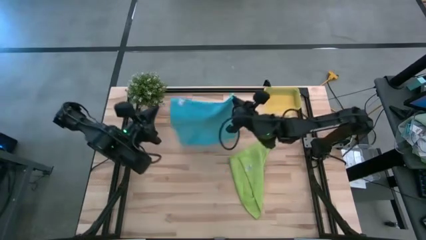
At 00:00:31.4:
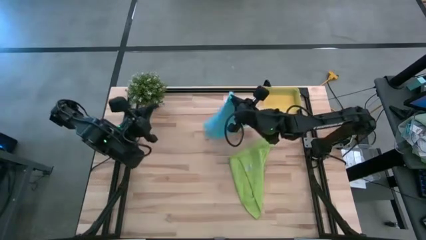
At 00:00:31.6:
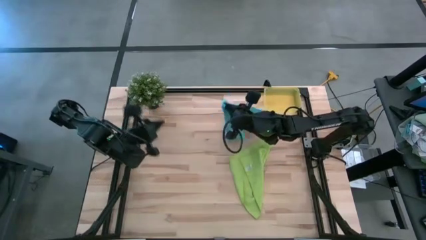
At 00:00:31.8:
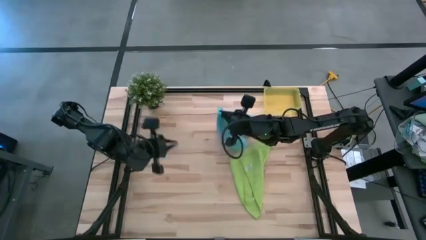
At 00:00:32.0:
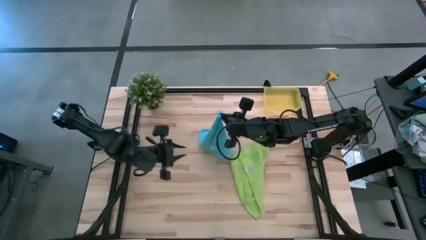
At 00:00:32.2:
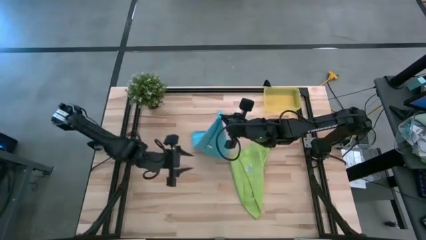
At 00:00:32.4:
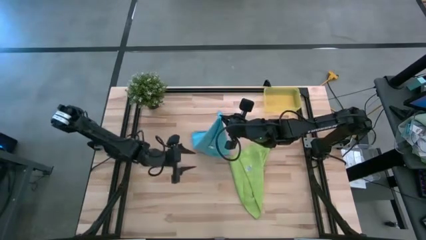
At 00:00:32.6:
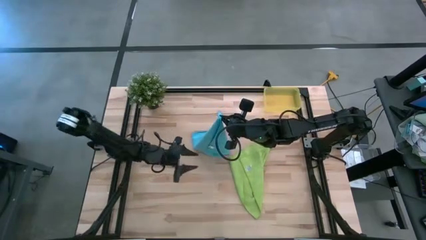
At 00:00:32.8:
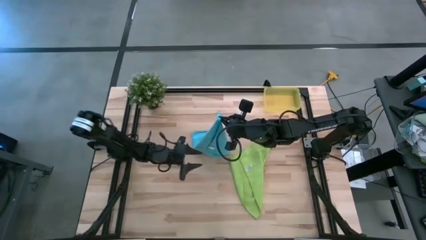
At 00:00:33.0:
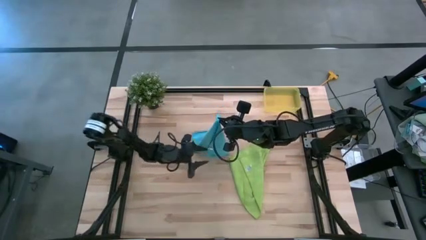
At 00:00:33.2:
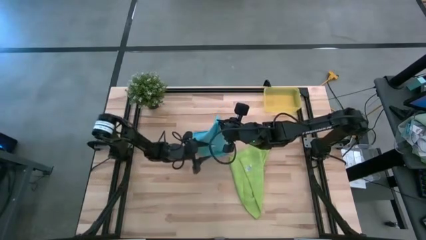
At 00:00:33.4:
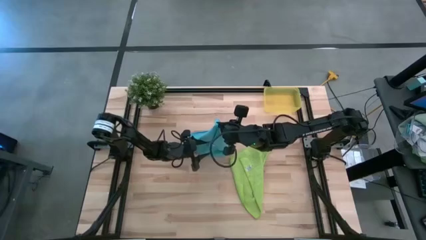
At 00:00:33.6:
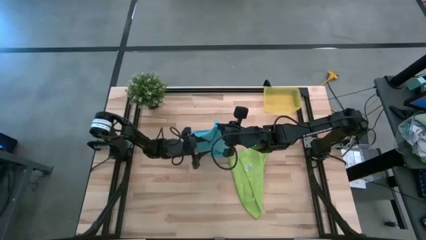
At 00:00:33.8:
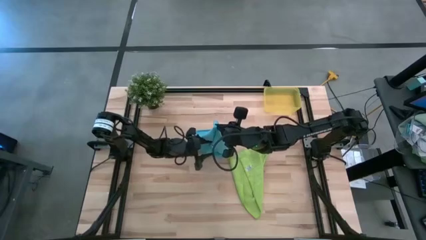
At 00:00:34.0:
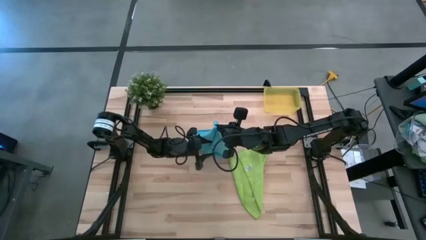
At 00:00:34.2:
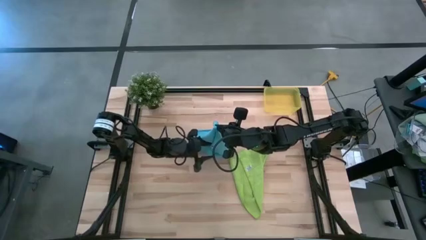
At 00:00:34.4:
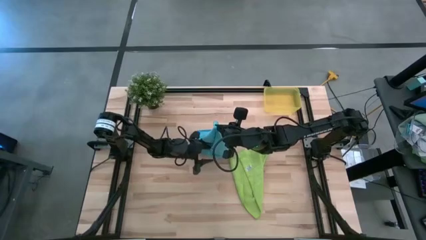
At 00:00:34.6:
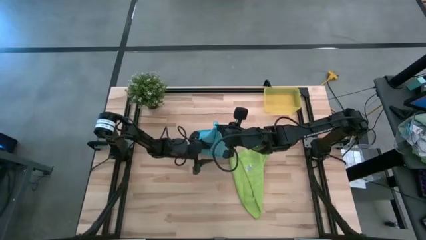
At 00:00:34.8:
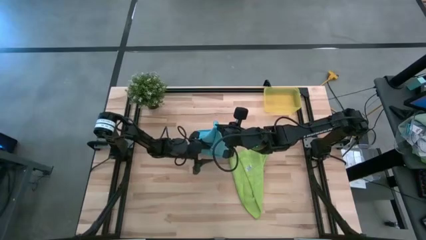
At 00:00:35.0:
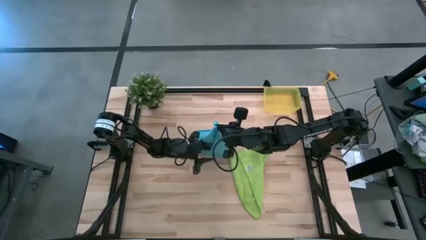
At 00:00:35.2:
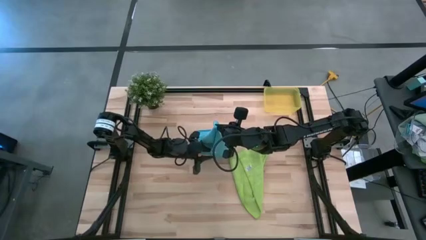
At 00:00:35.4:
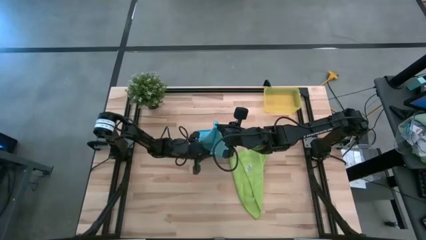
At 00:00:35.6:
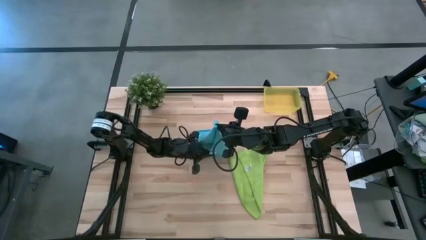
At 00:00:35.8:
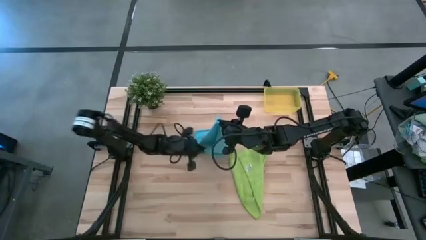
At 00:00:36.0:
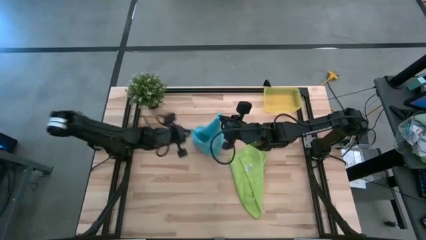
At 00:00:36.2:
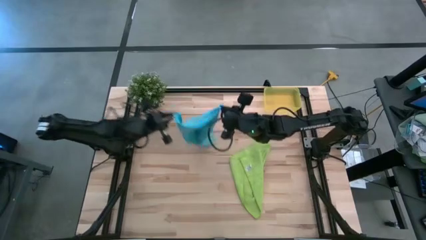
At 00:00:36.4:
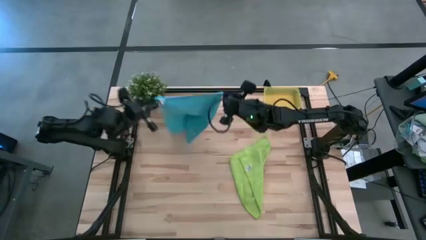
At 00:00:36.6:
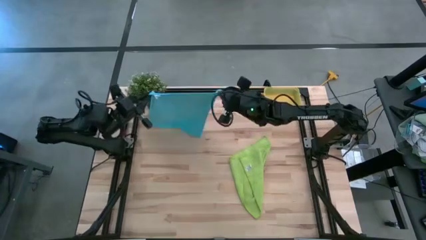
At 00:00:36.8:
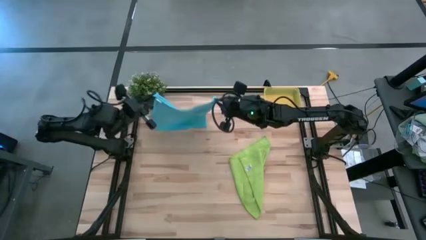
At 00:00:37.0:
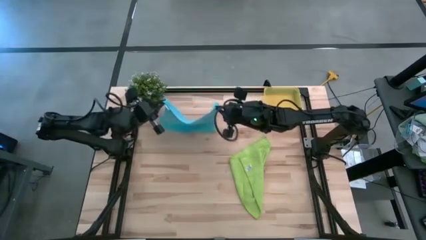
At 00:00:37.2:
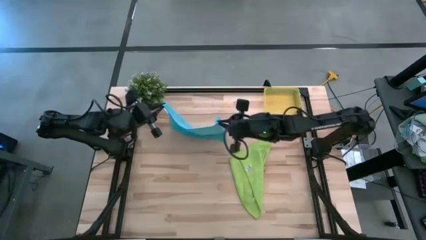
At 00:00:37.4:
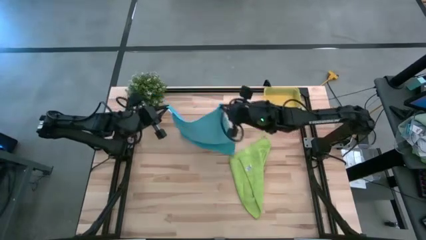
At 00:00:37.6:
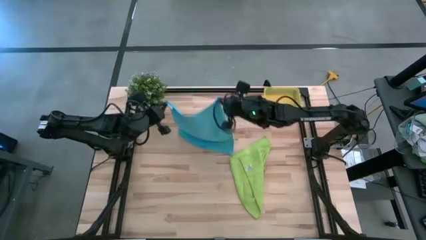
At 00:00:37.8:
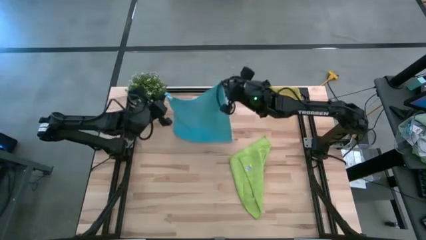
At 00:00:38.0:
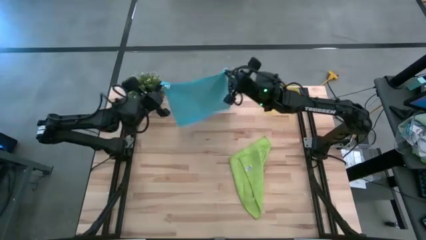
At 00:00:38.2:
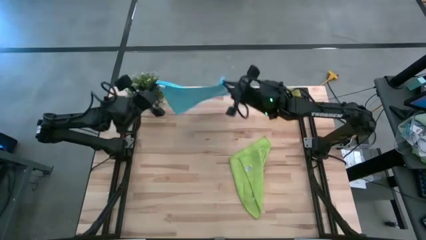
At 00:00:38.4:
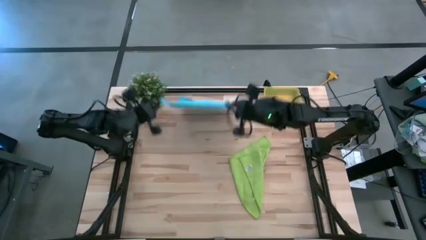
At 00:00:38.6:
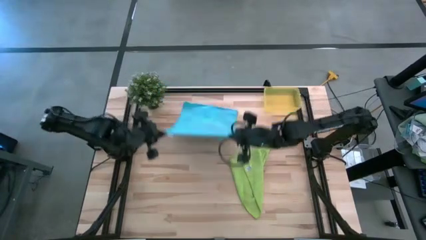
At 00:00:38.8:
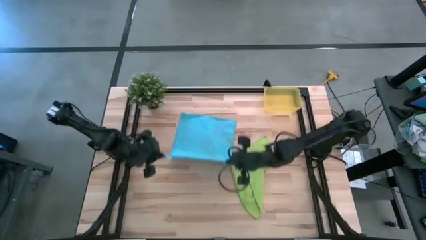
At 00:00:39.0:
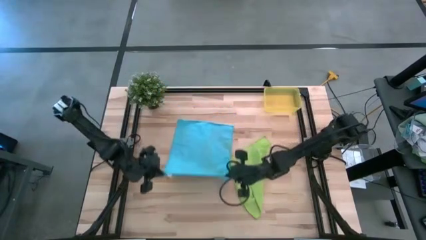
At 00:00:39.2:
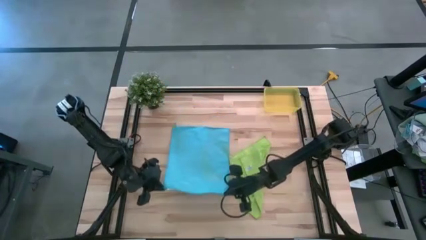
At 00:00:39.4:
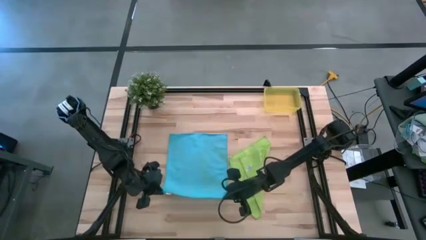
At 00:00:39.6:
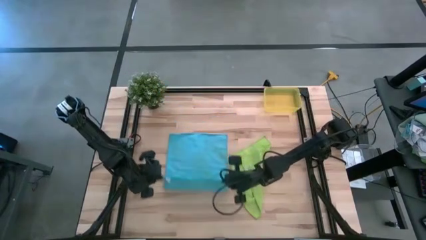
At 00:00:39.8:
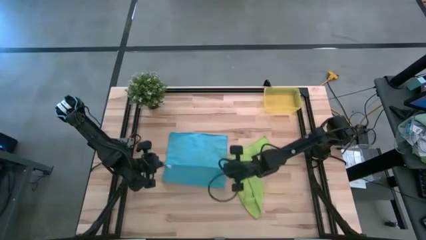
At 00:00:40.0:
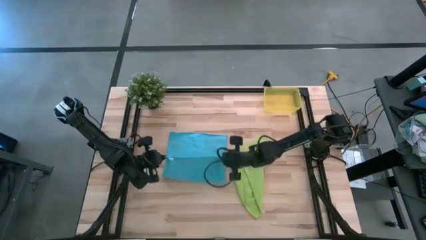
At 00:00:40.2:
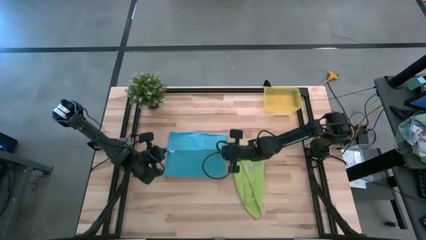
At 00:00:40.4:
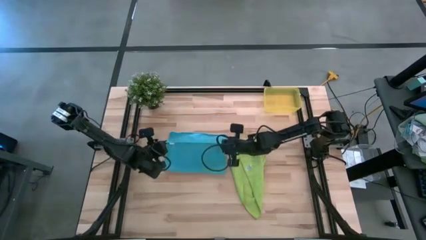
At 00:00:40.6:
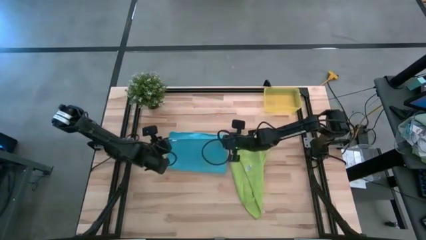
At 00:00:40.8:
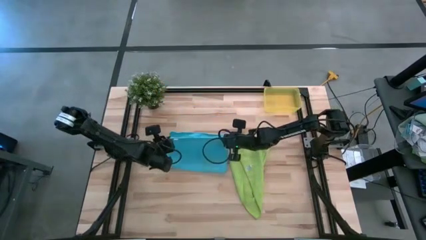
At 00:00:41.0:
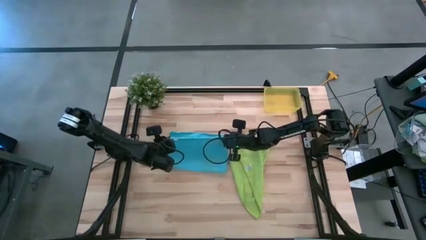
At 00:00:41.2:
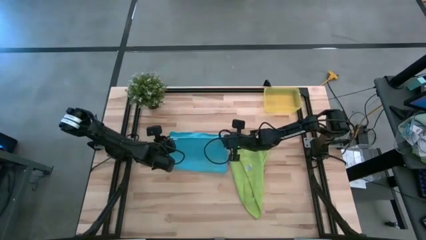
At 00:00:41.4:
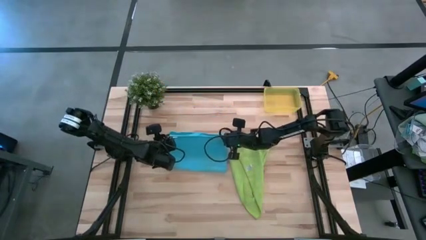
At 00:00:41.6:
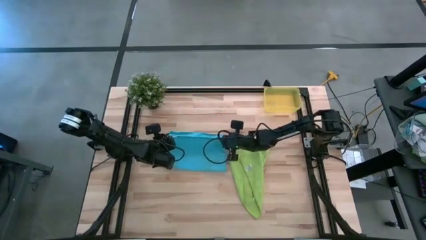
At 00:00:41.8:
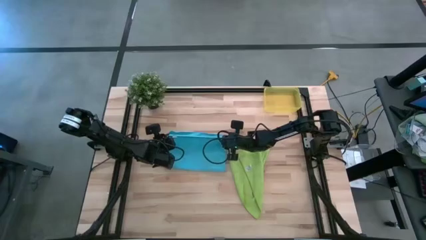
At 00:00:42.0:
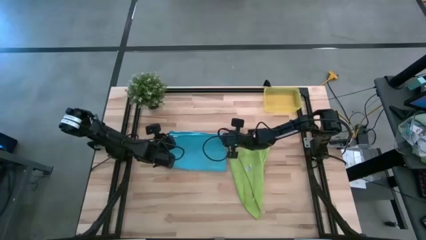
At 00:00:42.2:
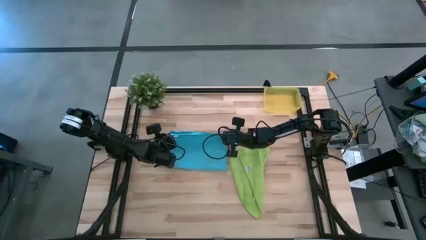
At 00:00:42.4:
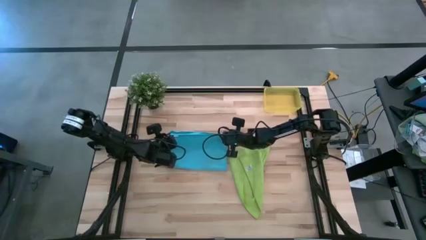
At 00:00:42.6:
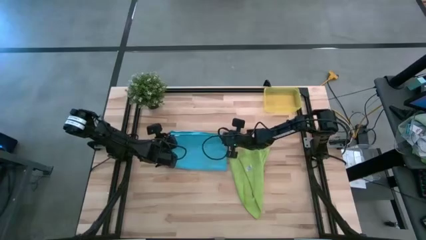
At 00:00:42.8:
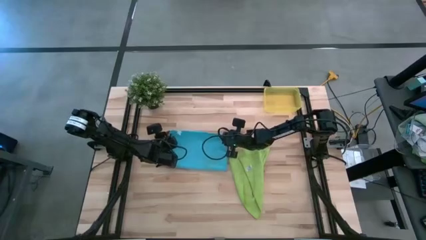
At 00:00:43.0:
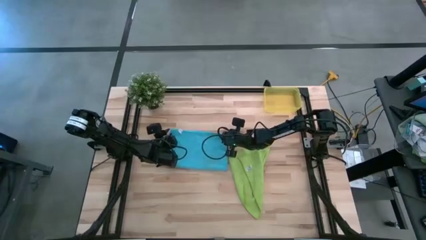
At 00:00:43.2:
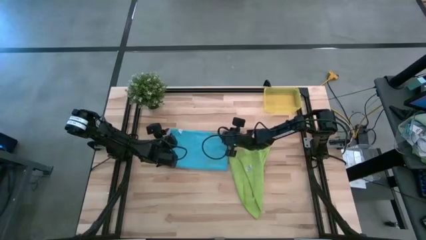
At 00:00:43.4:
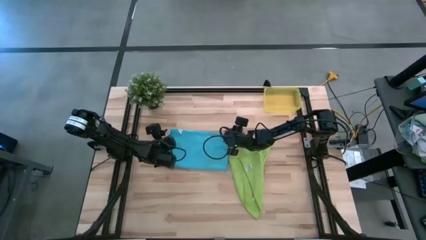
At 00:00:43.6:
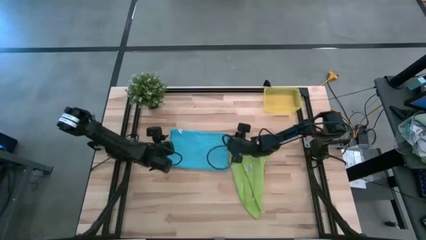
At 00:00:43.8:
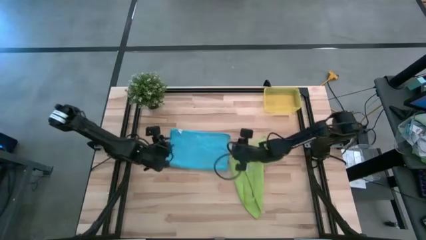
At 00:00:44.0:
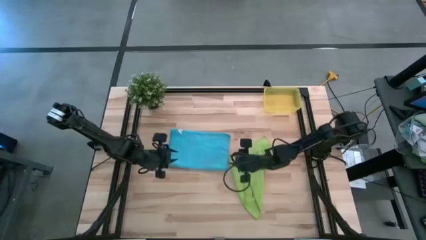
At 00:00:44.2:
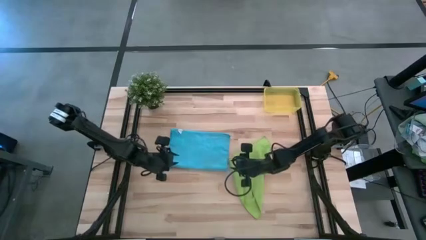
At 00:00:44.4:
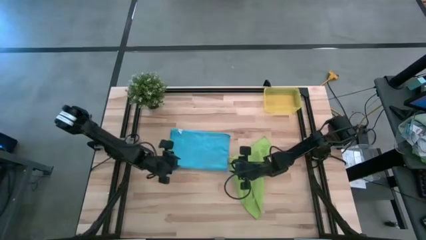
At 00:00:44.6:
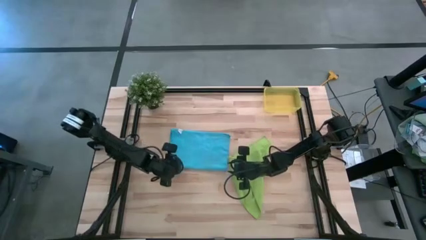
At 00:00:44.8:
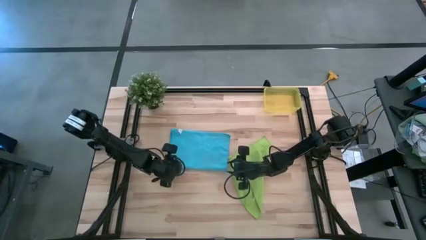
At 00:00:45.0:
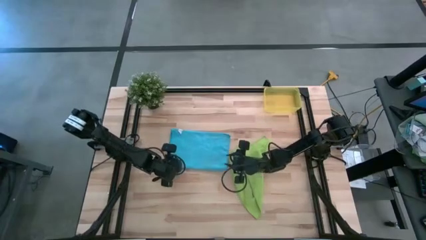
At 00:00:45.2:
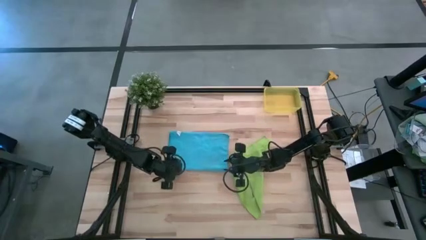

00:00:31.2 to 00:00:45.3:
Task: Roll microfiber towels into tight, uniform cylinder then place into a basket
Fold the blue microfiber towel
